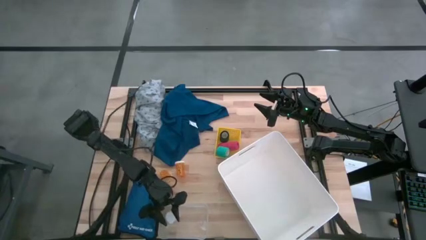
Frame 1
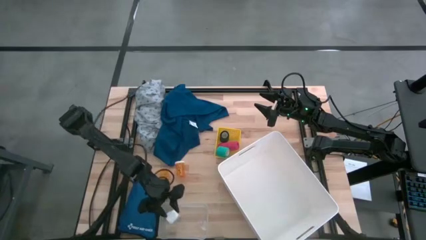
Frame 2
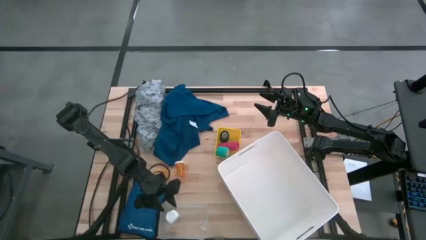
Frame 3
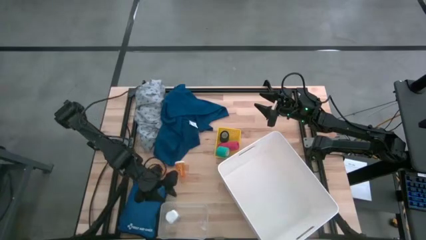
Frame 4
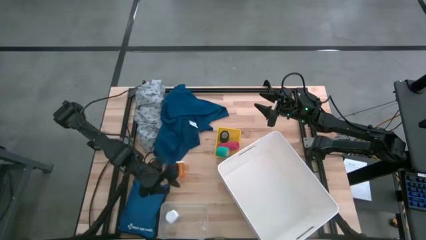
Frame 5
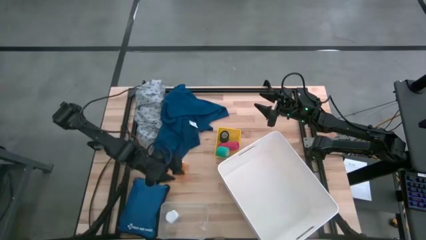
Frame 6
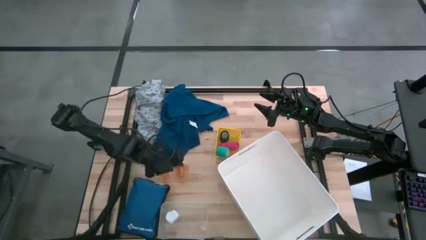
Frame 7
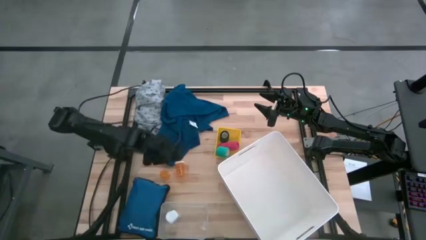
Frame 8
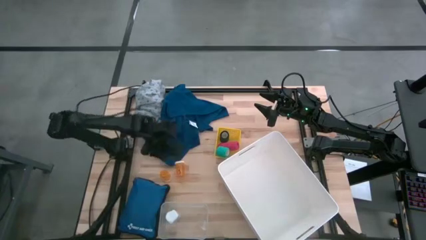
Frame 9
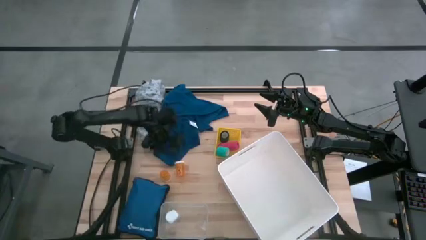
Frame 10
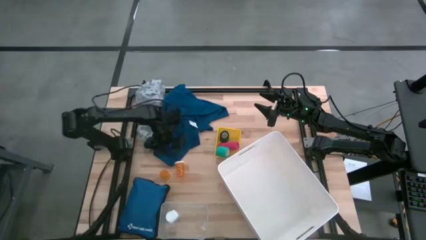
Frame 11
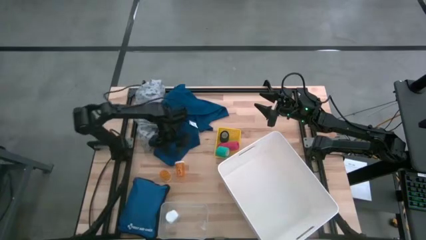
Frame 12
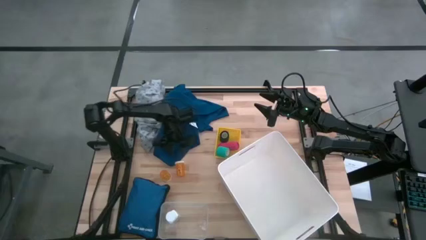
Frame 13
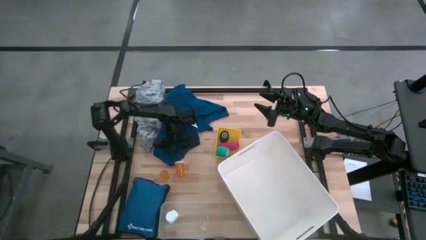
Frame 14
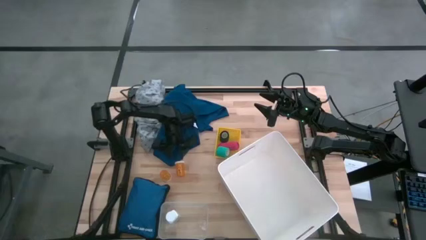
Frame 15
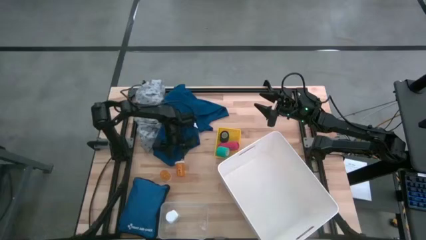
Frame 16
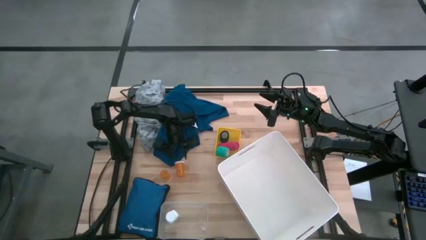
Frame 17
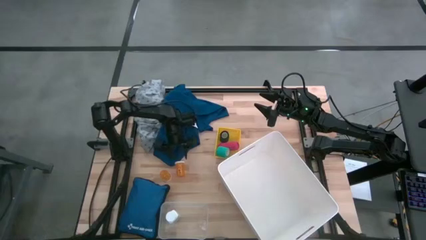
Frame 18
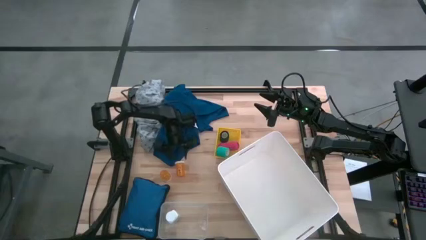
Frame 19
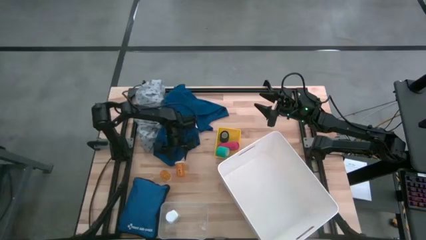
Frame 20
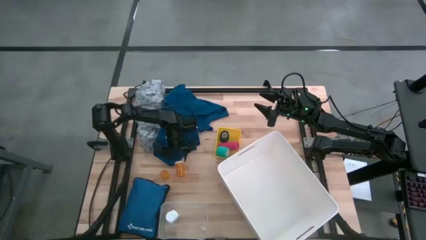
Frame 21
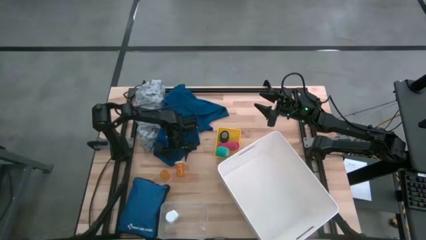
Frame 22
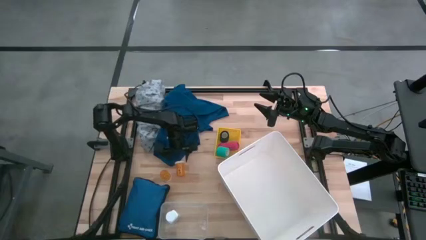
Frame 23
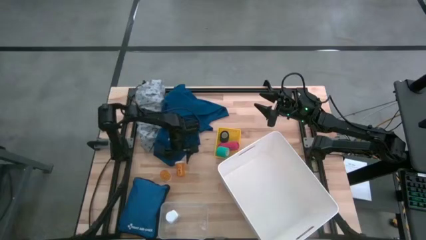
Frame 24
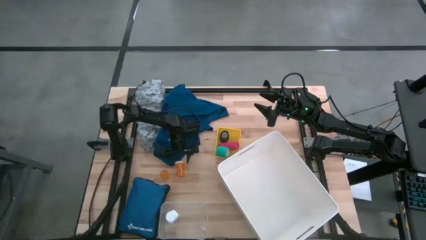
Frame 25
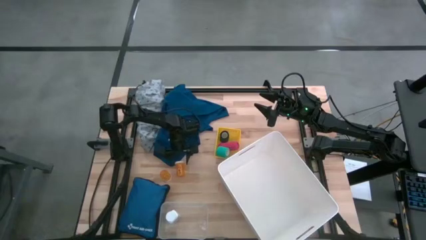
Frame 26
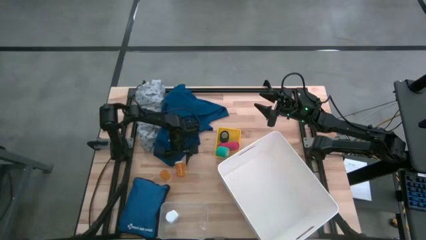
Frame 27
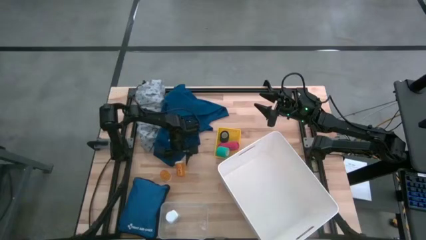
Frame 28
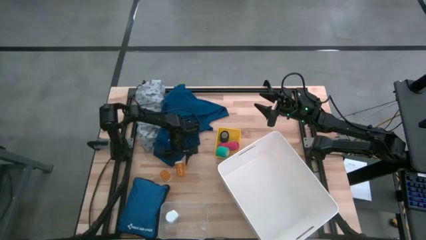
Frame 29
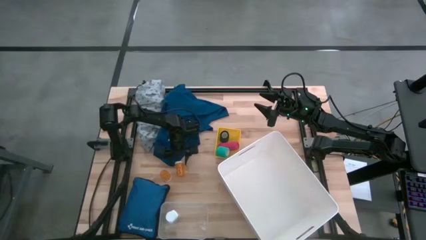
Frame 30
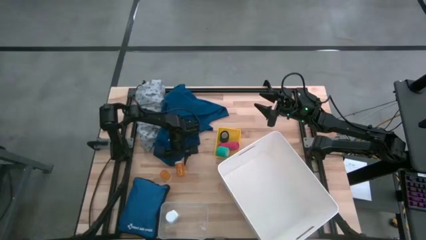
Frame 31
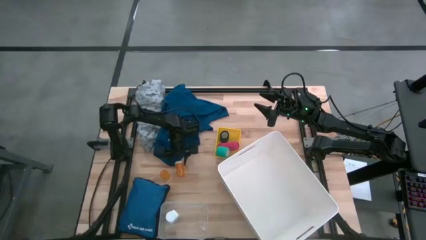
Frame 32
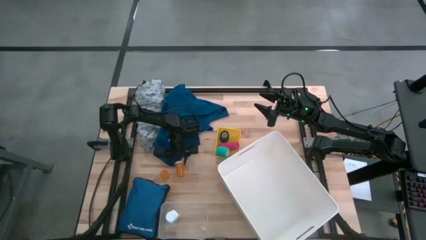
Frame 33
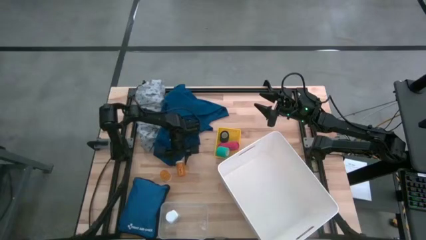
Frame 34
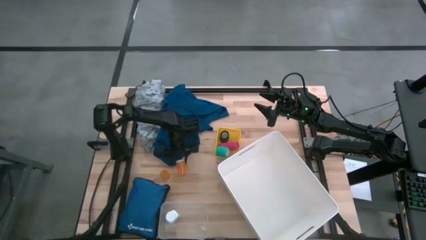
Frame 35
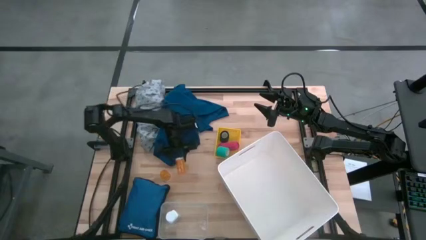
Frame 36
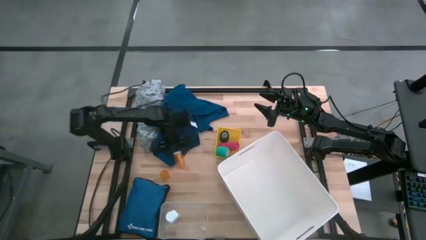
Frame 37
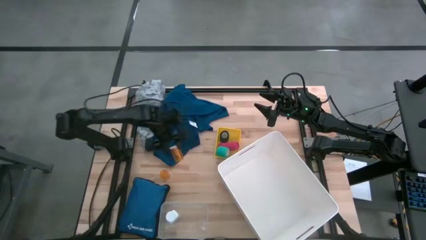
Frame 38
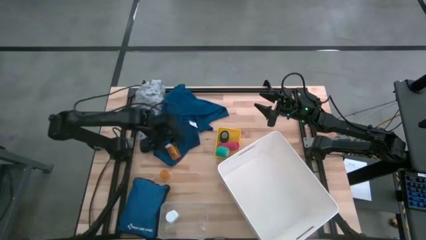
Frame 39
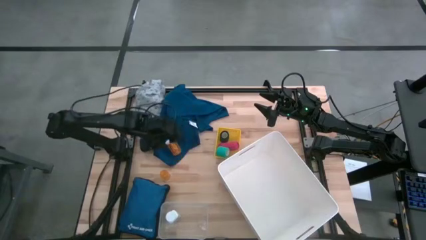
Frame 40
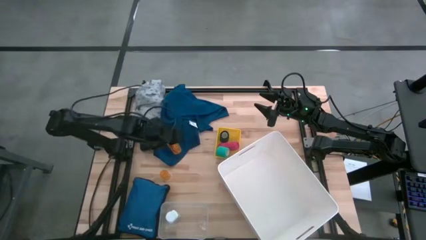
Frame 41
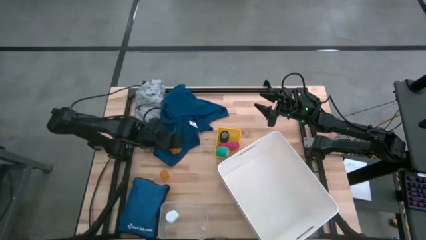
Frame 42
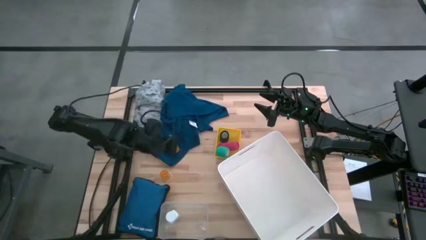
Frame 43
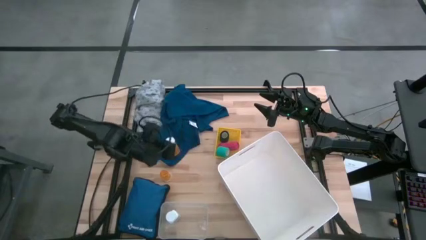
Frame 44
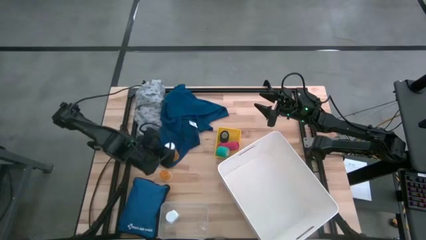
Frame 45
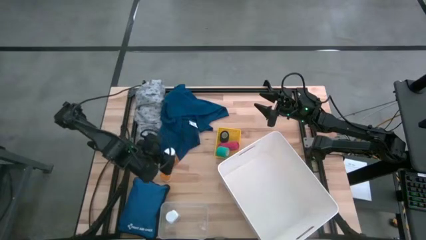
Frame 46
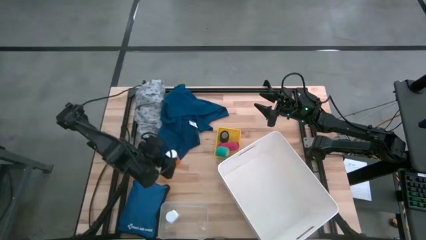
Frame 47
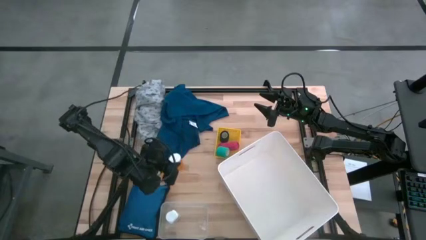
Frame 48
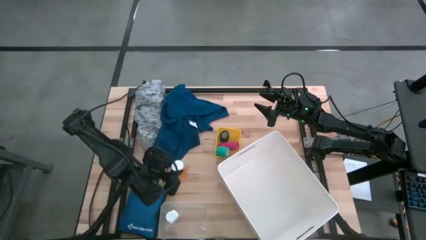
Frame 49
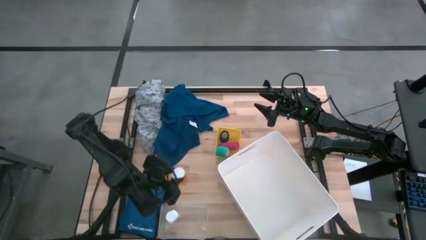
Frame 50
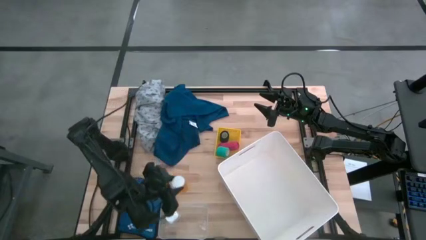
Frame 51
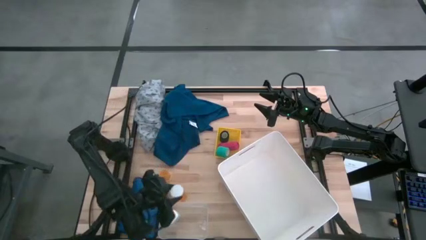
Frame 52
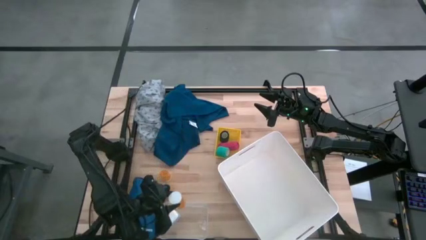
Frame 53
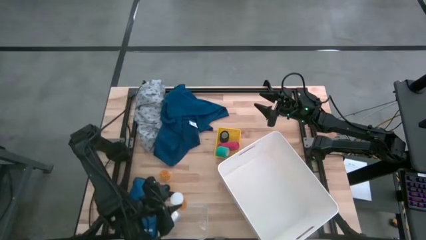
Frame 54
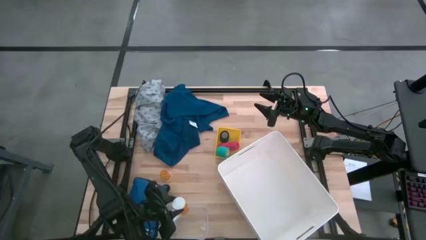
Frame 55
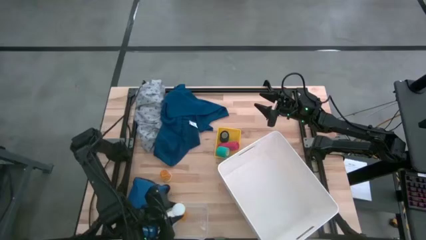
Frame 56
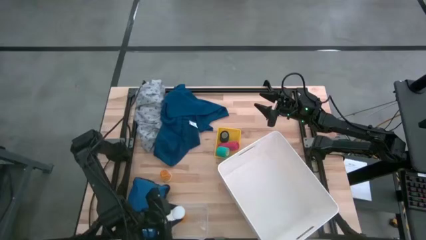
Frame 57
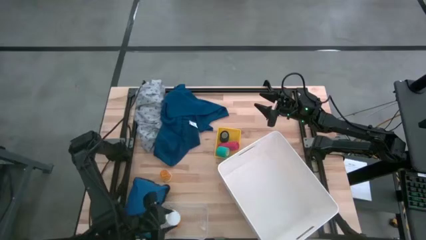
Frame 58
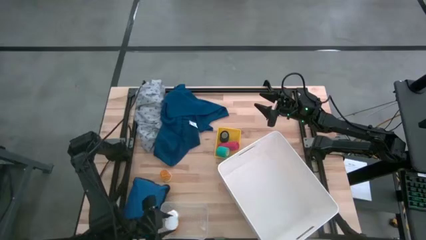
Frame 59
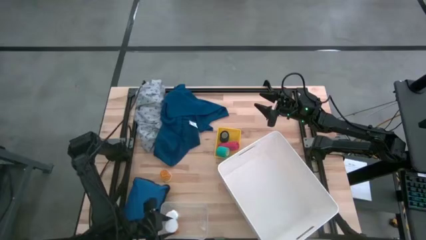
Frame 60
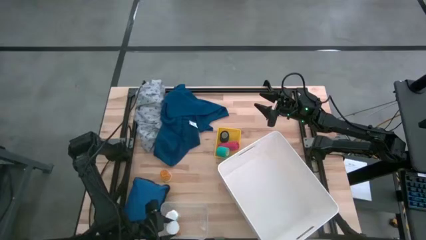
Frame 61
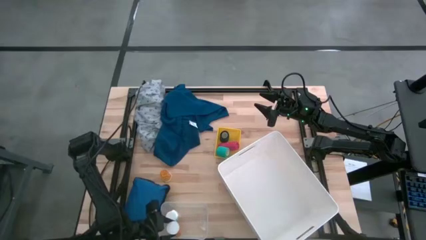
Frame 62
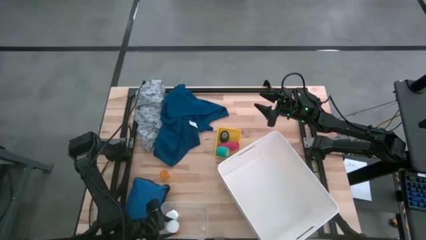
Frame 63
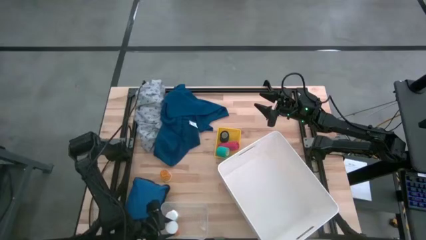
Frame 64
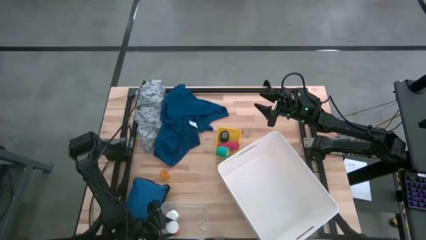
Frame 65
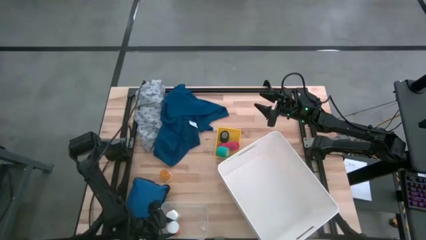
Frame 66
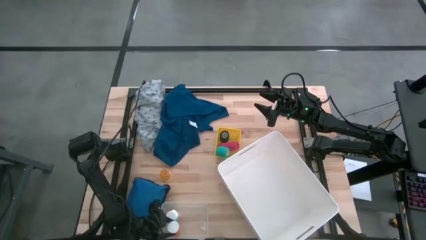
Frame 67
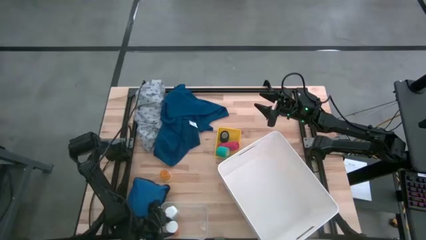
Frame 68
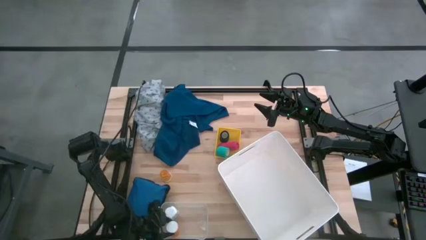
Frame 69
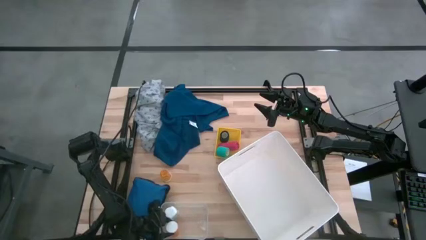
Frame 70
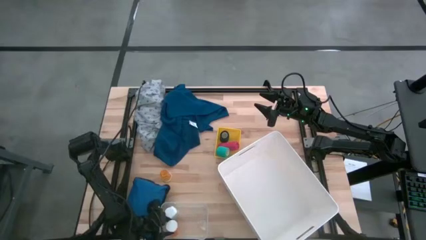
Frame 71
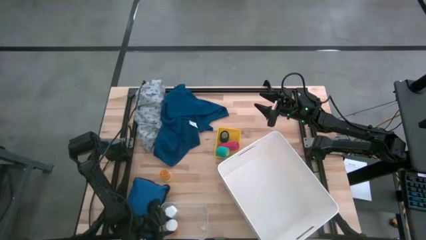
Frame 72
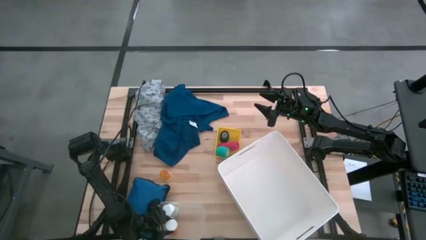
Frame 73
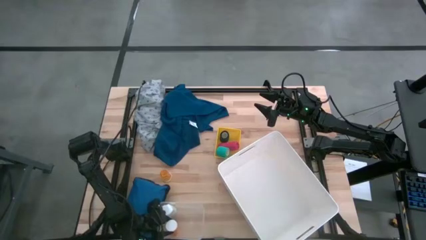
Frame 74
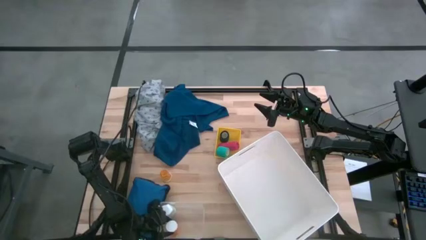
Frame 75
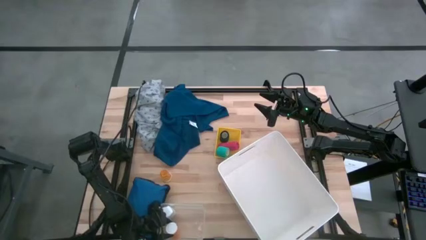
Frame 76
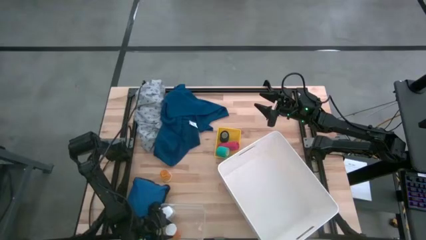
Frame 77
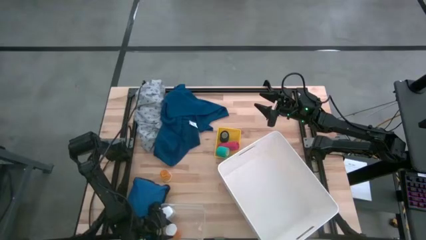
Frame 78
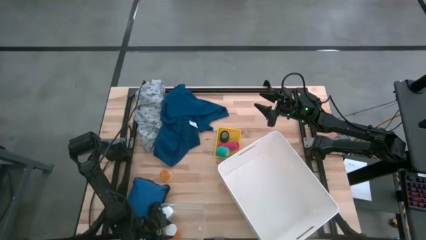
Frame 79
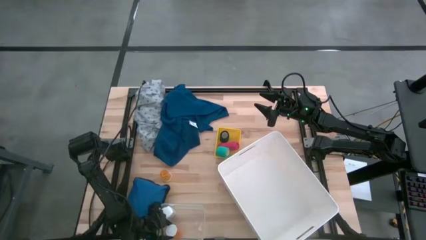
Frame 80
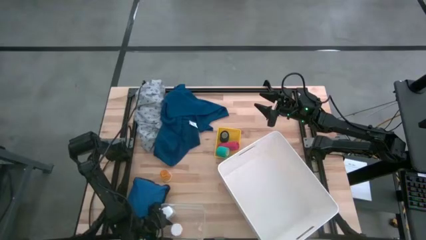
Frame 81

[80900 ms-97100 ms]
Task: Pick & place medical supplies in basket/bin
Put the right orange pill bottle into the transparent bin
